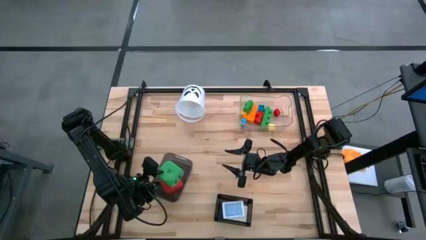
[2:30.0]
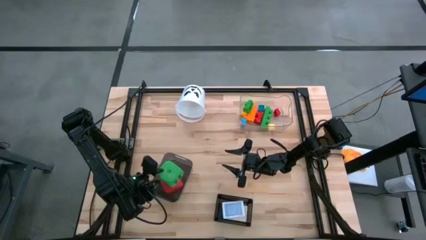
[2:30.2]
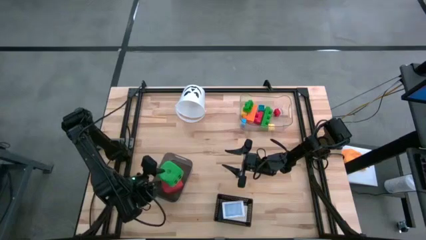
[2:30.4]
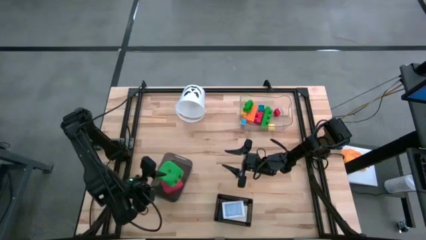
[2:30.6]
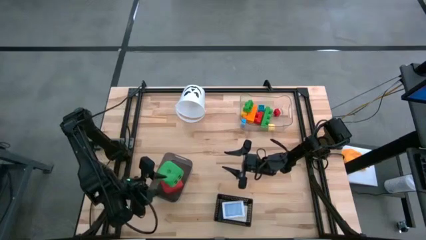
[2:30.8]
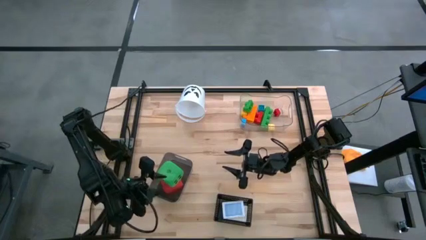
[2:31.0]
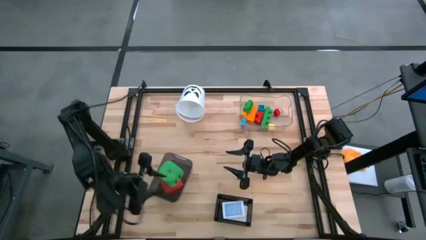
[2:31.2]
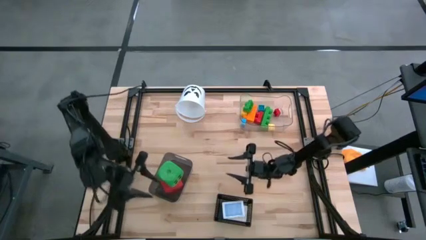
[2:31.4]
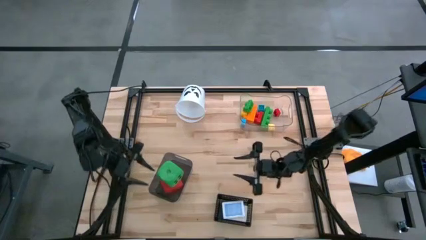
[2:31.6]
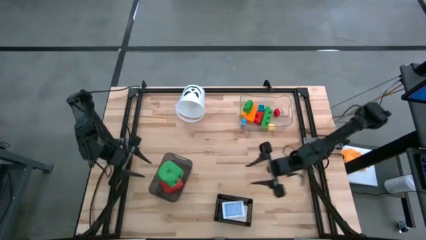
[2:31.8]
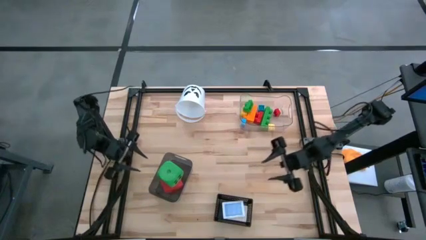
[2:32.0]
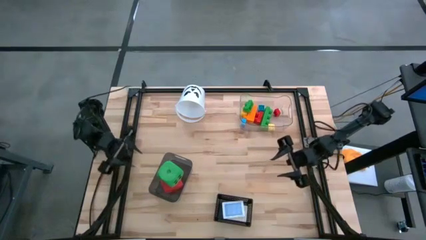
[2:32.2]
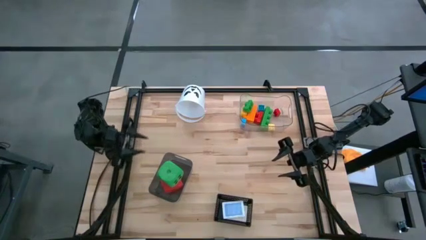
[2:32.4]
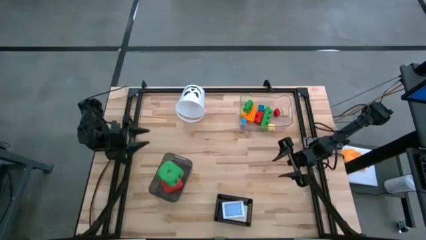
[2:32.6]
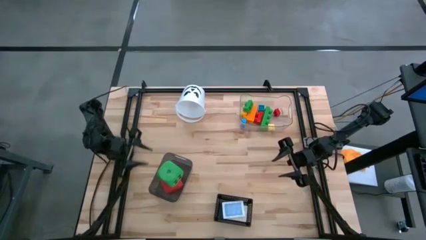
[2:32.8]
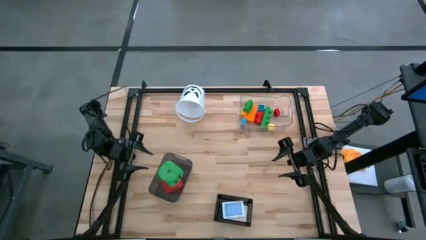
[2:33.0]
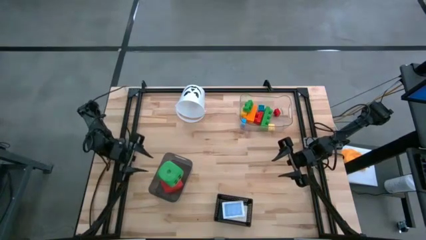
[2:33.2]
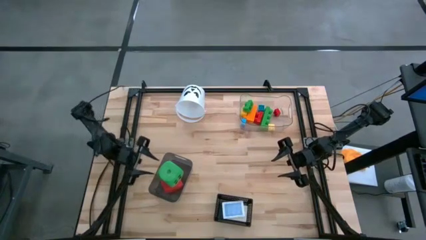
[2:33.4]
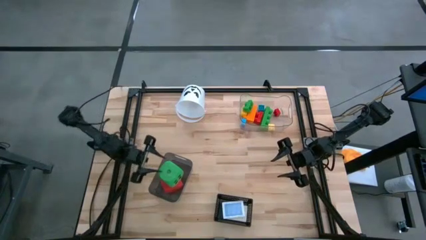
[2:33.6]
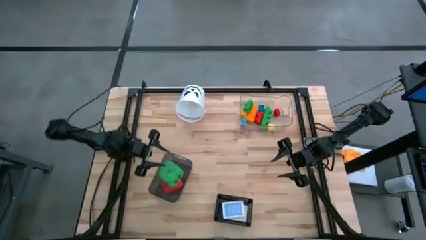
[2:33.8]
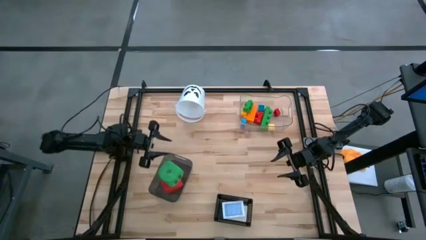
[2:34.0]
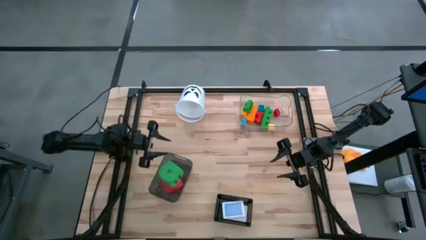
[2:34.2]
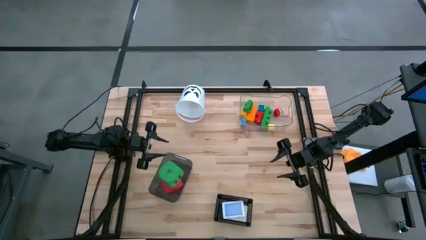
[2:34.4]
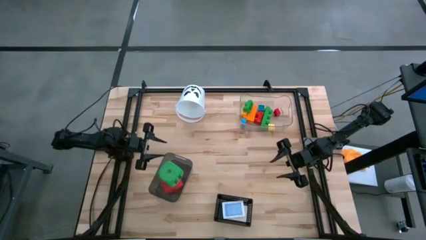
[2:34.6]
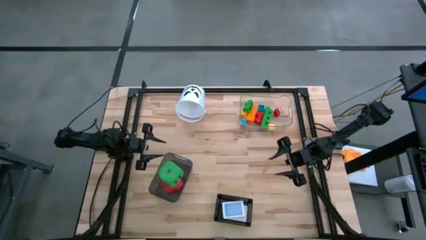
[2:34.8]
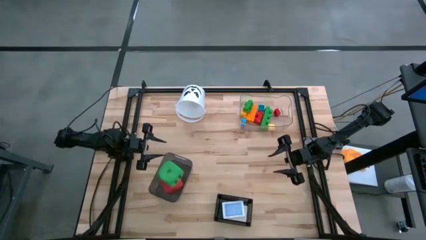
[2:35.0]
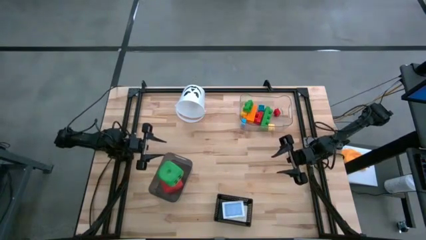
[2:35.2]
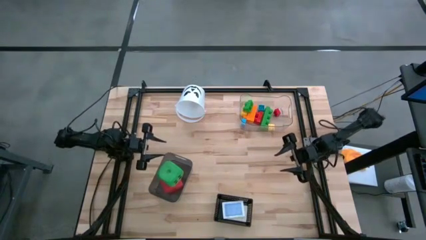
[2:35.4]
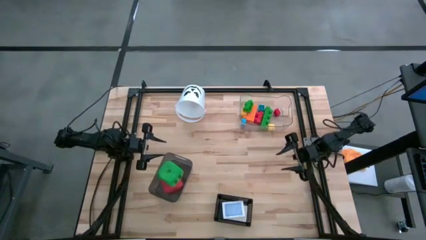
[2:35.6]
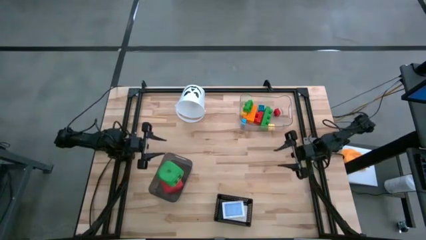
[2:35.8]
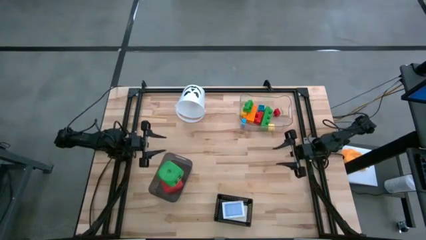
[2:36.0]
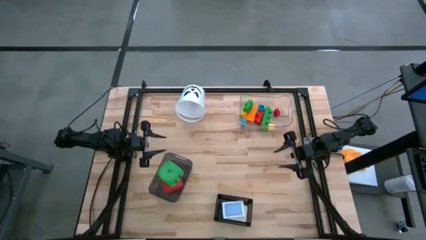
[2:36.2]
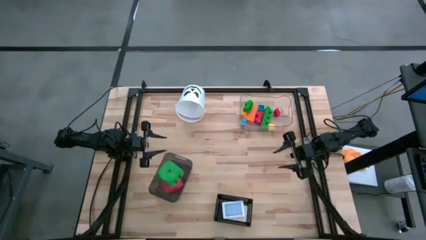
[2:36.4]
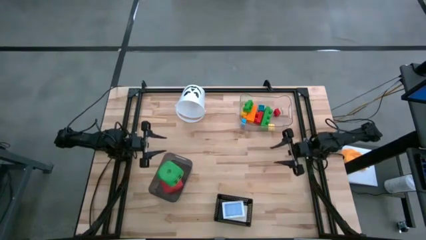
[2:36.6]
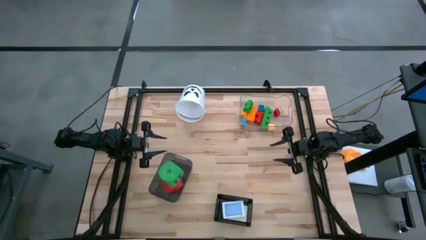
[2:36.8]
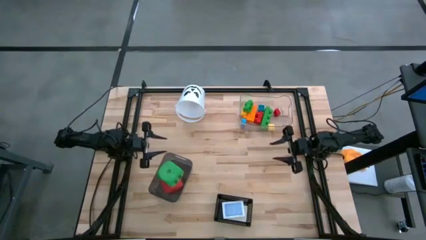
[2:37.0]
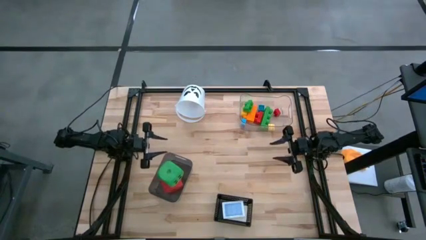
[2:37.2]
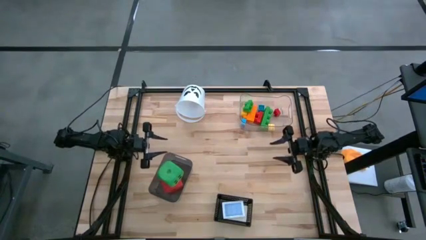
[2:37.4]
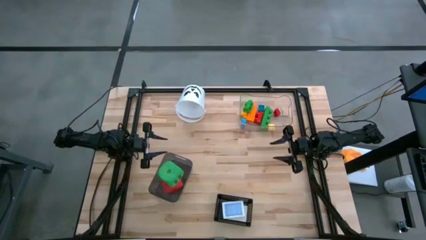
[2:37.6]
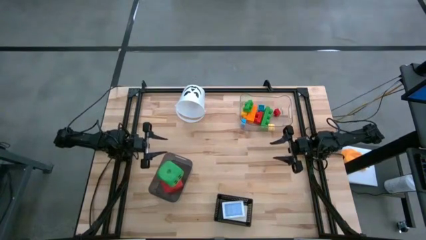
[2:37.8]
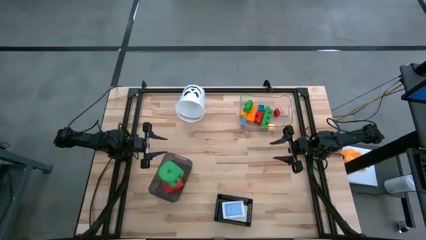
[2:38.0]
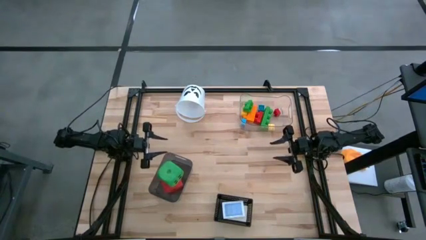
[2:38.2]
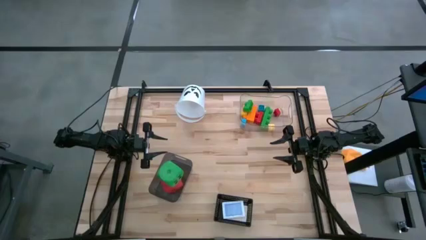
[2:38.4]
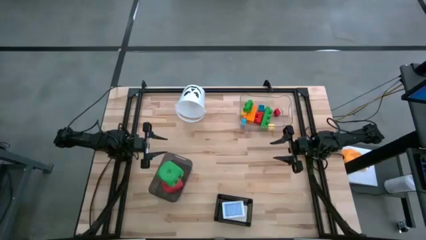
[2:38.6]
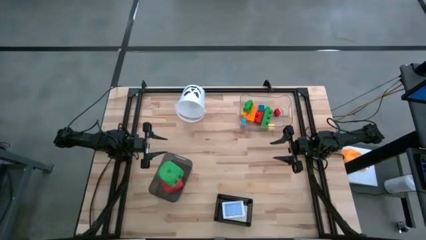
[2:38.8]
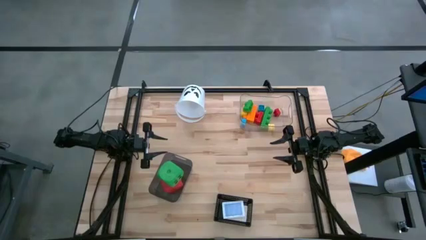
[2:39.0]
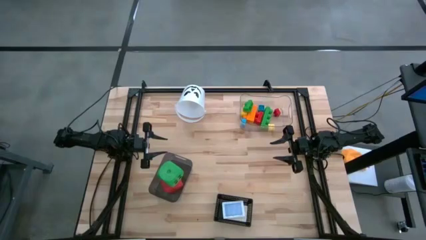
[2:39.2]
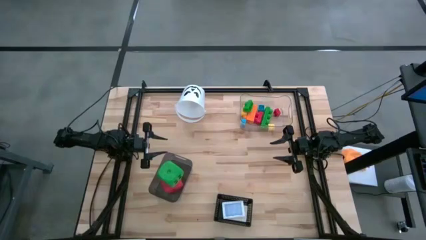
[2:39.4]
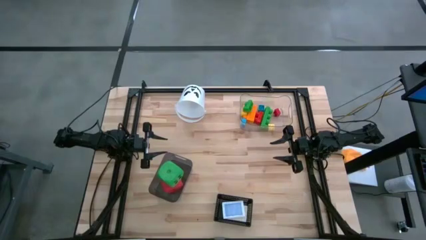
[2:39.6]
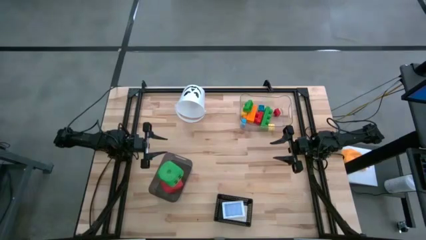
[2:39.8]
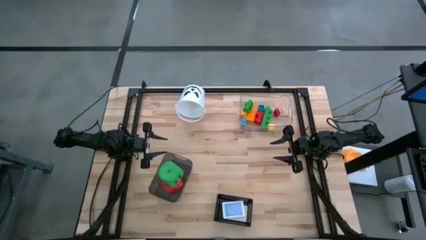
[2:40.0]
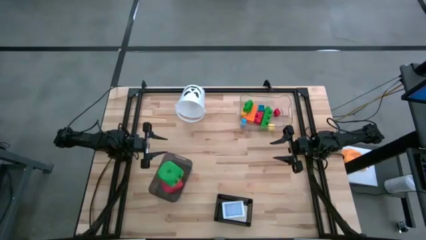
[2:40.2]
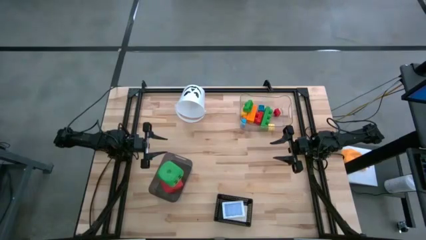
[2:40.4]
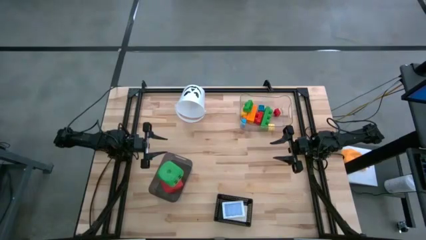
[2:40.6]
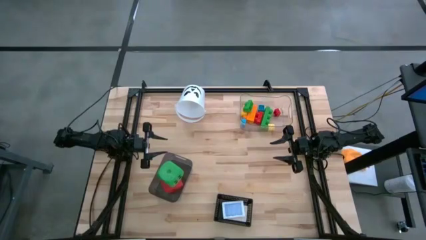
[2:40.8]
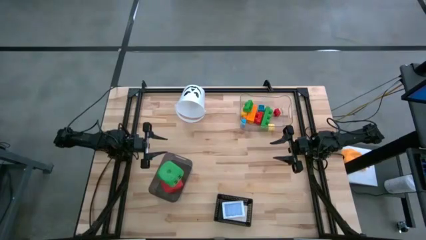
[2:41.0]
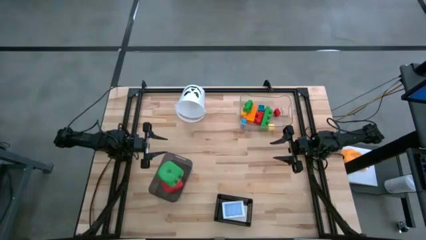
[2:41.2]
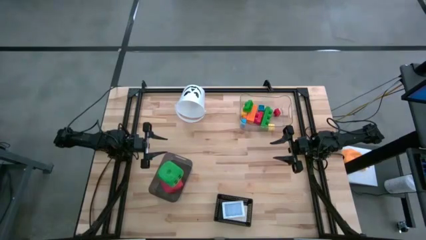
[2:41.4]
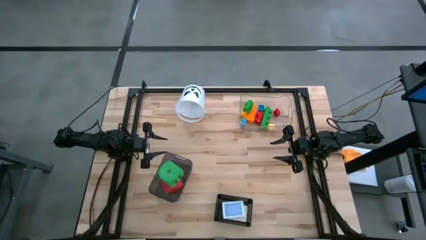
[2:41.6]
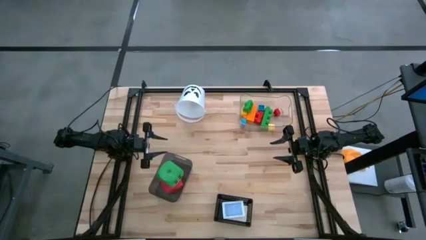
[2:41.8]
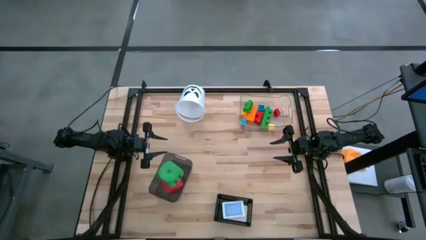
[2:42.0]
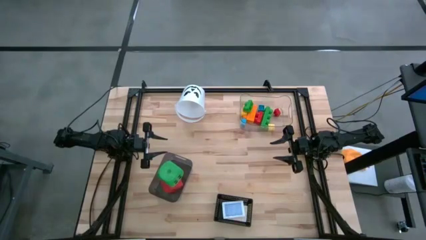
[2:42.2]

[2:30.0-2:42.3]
Task: Pick & Place Toys
Return to Home Position

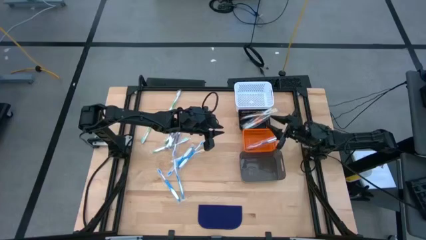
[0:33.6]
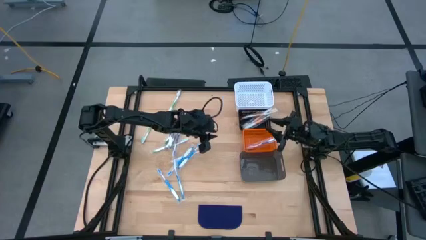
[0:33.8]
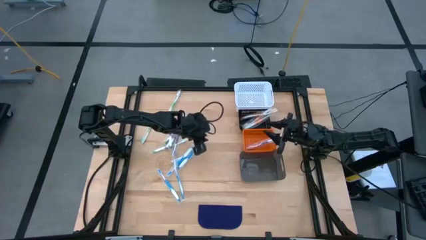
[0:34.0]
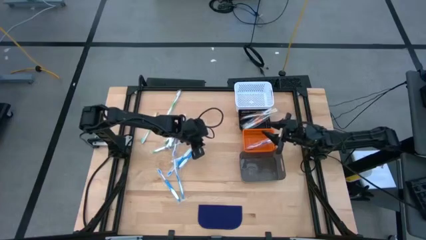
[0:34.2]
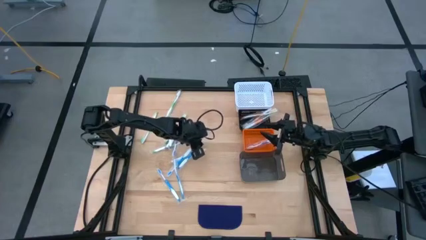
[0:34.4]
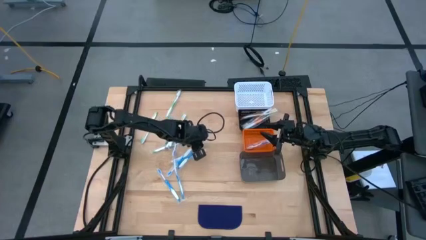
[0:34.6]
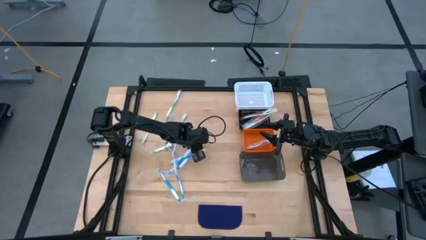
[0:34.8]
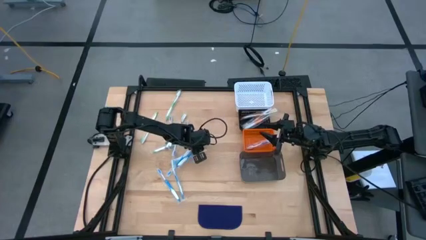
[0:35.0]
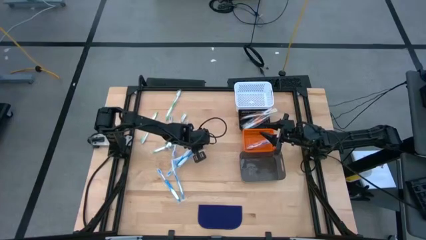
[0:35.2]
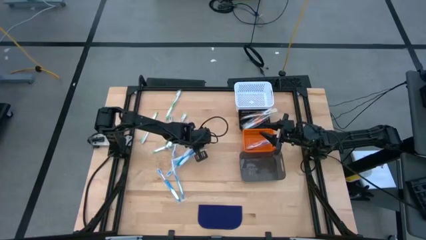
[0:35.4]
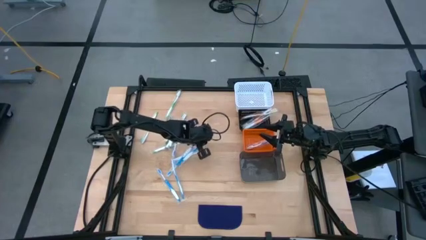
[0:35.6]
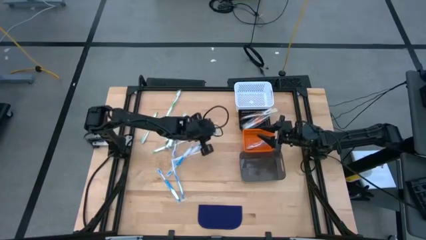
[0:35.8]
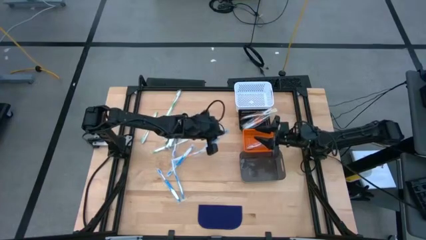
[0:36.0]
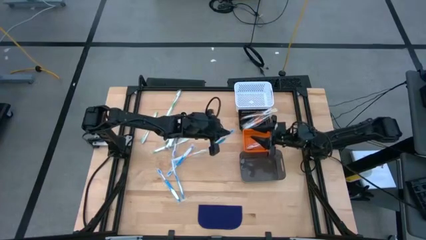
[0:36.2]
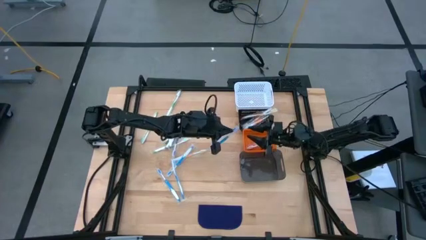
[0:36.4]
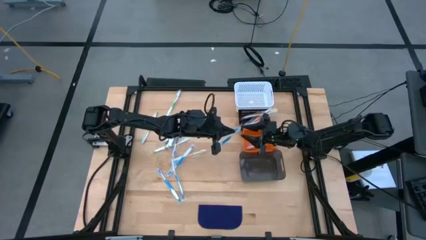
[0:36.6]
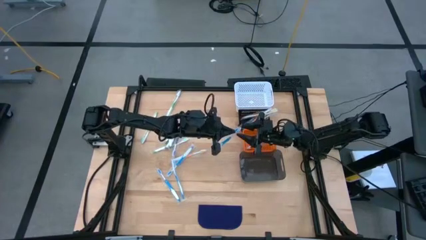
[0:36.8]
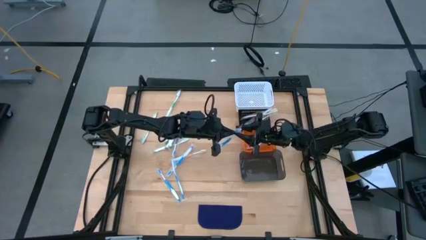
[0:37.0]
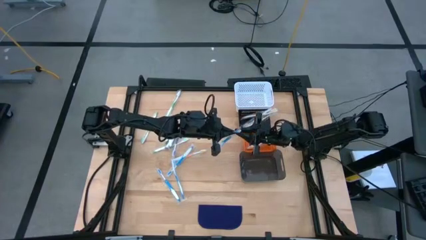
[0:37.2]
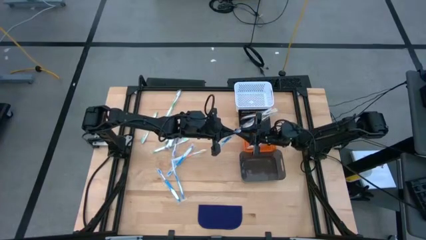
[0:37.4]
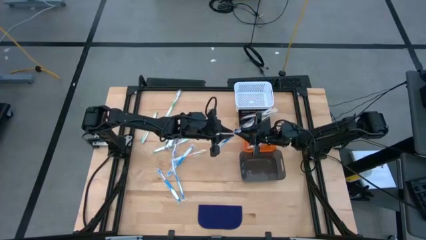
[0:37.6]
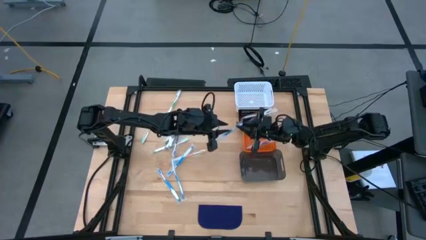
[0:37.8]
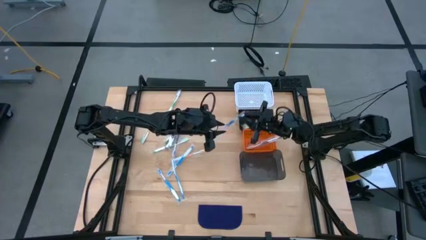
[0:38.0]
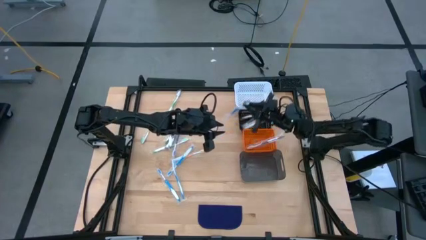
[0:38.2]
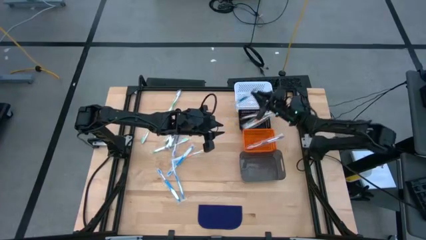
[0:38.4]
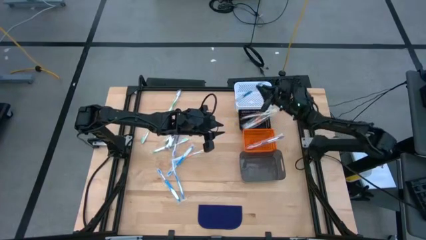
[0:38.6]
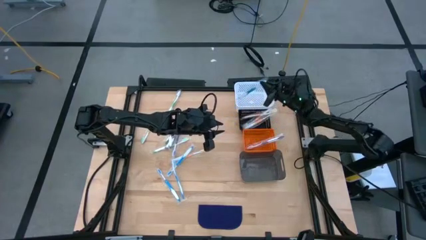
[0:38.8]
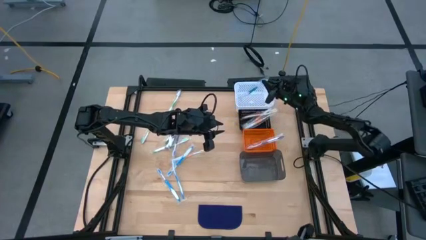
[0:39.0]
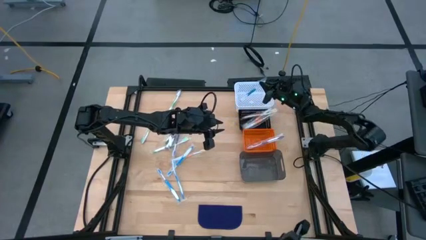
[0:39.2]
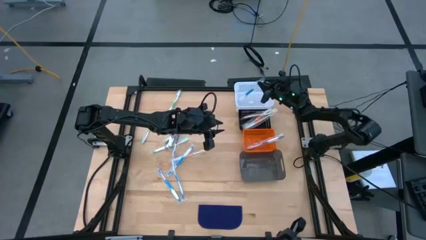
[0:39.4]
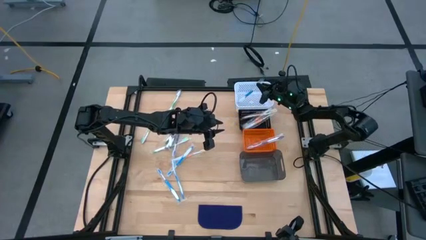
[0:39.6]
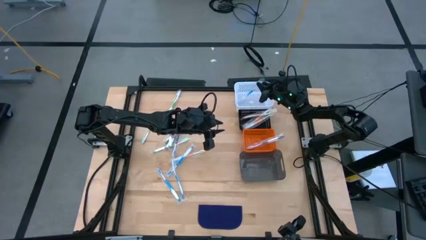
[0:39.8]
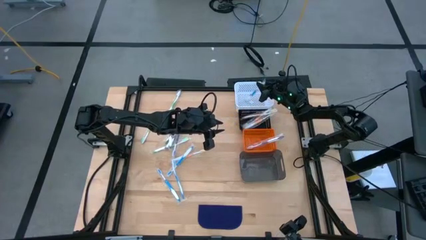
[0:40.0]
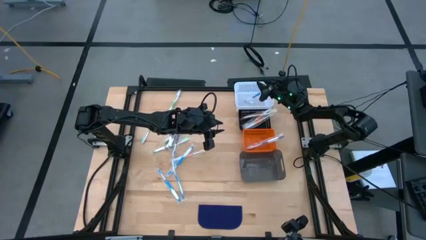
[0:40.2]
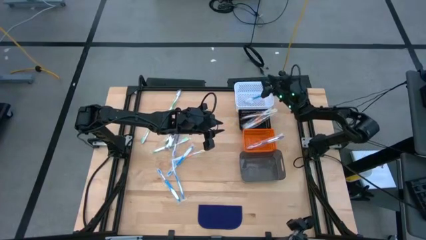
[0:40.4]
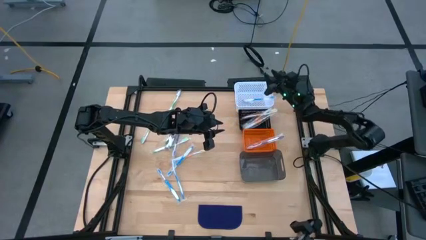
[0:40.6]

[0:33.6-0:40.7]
Task: Pick & Place Toothbrushes
Put the blue toothbrush into the white bin
